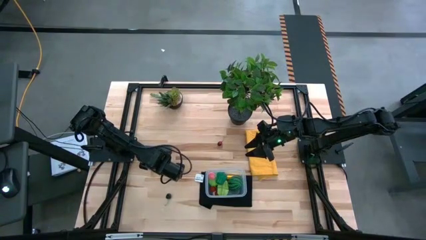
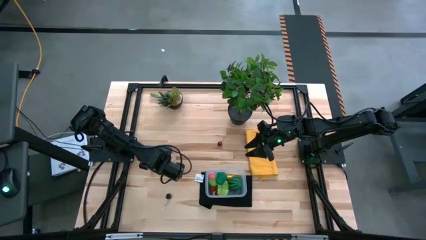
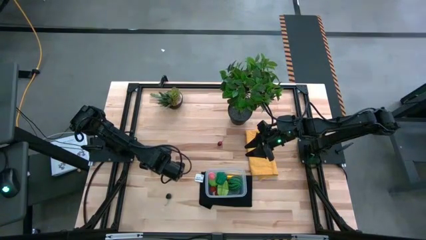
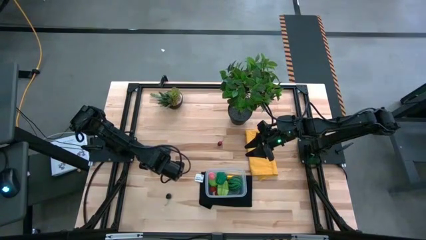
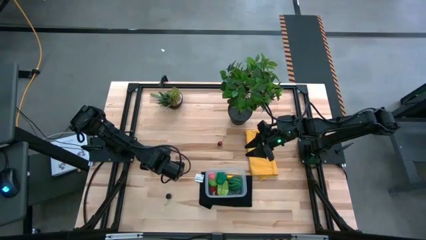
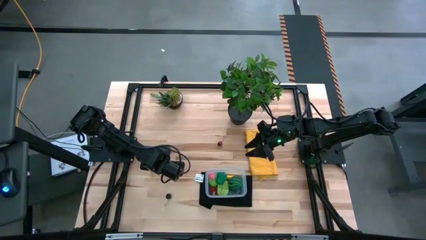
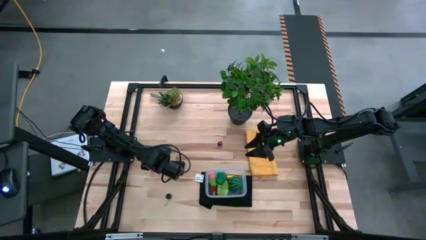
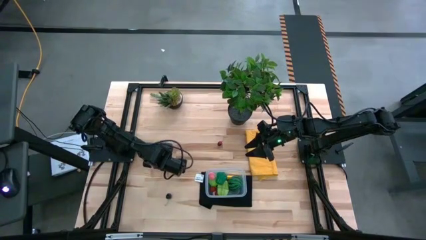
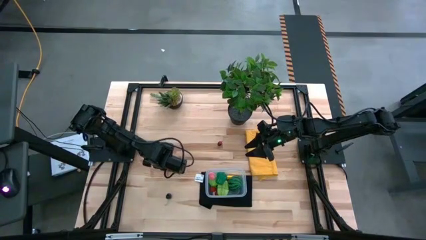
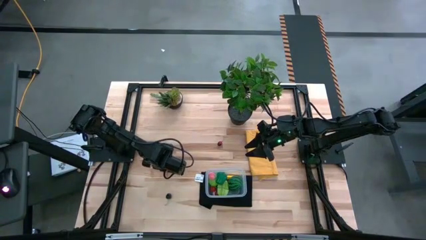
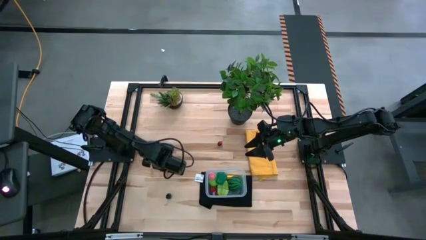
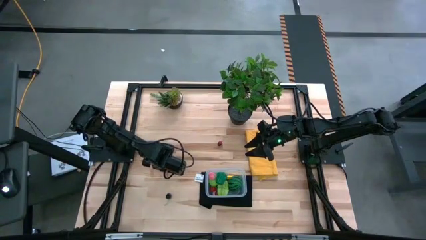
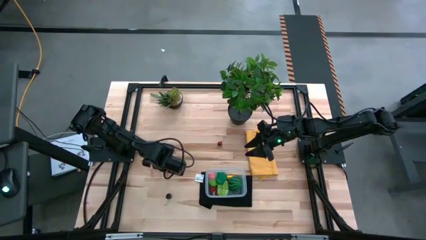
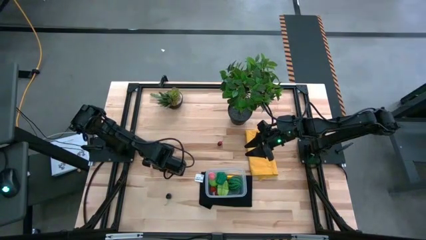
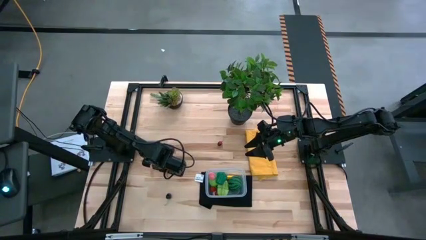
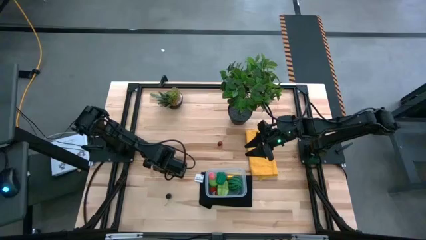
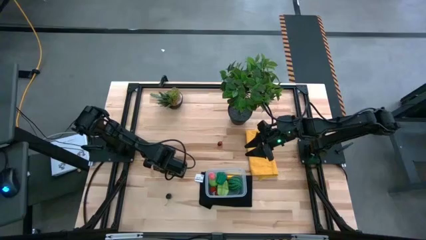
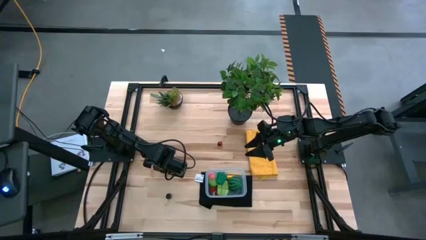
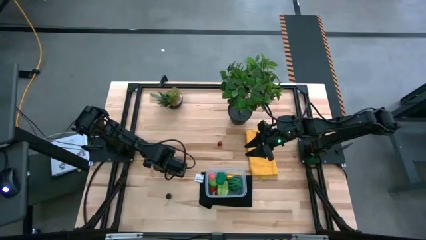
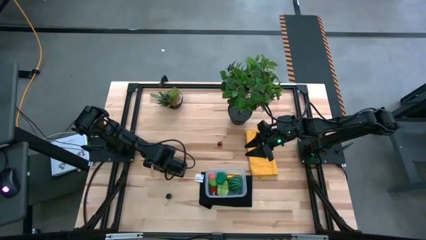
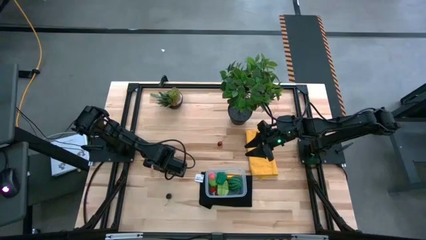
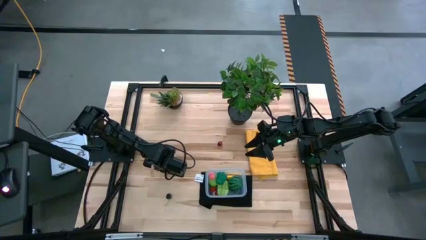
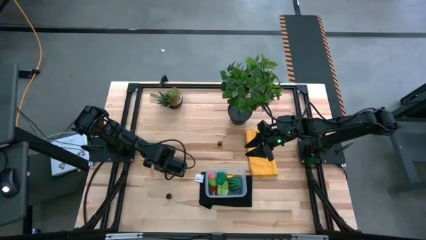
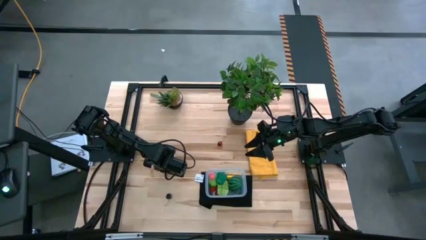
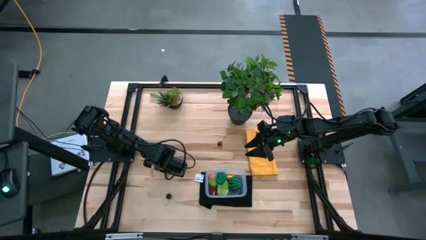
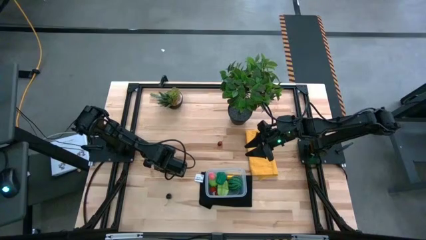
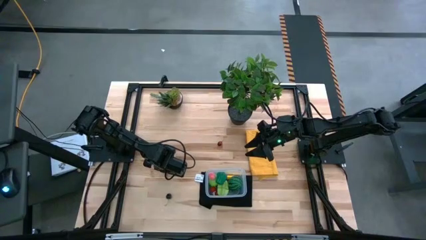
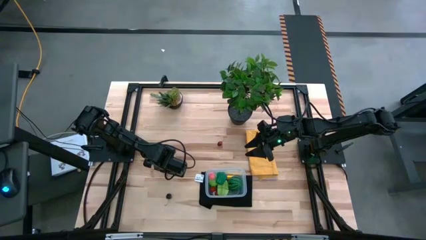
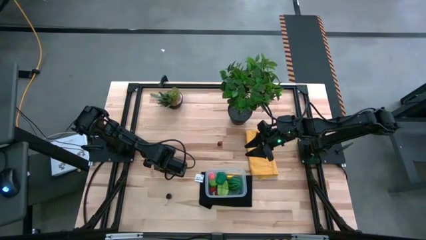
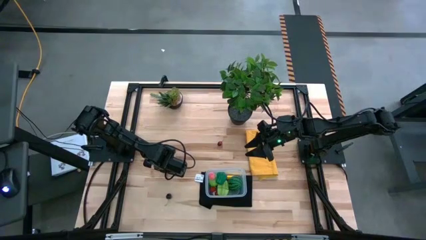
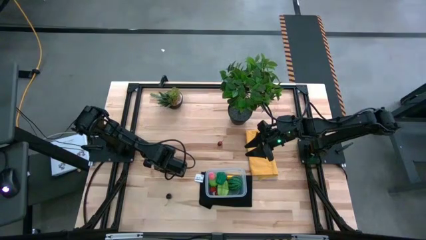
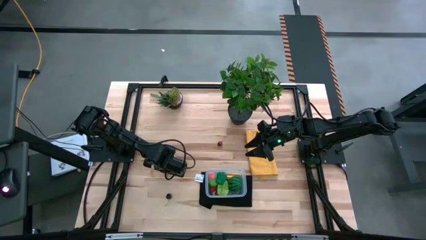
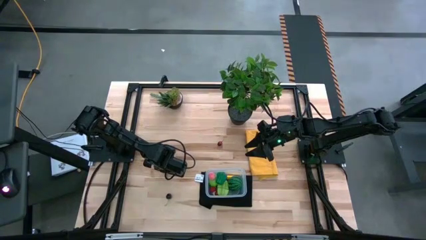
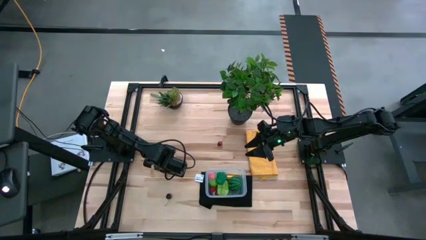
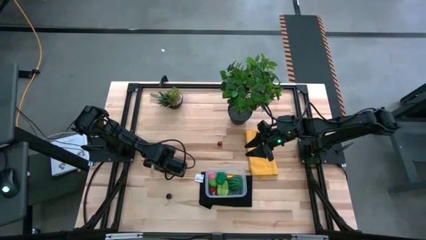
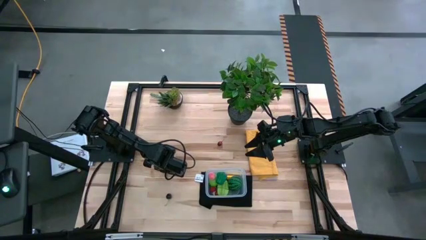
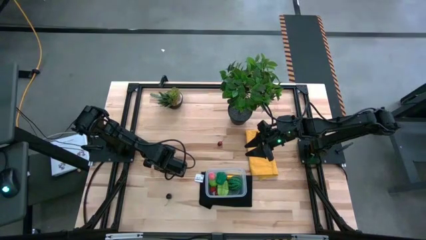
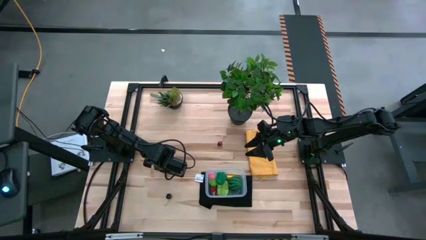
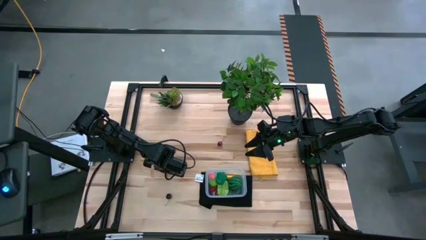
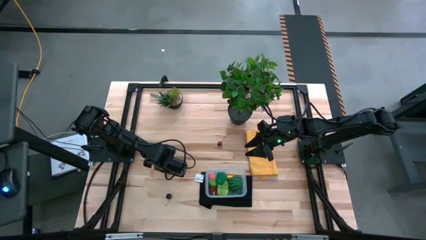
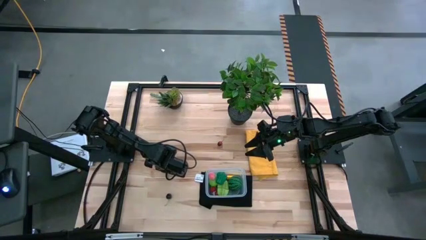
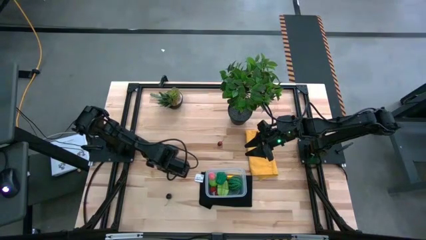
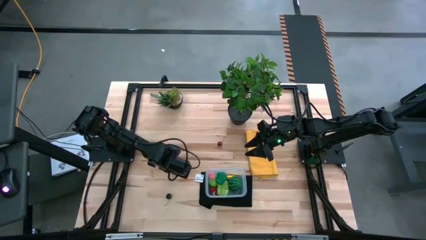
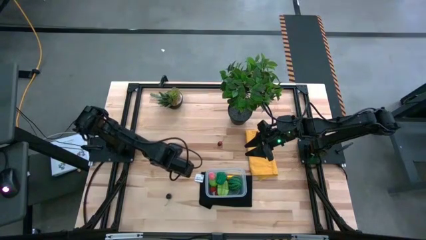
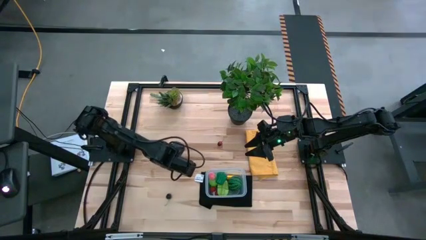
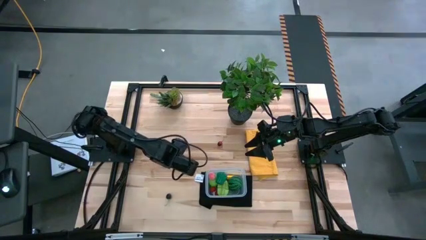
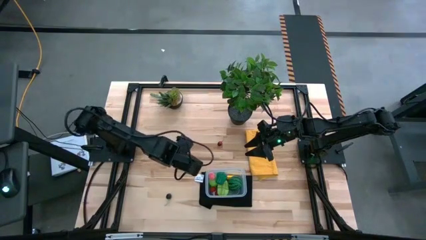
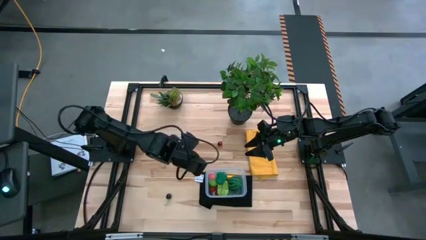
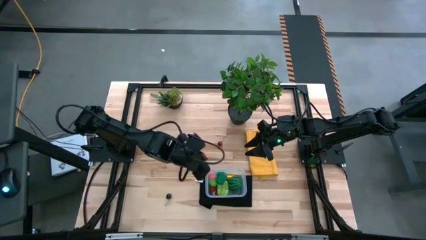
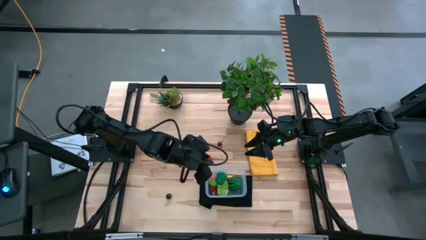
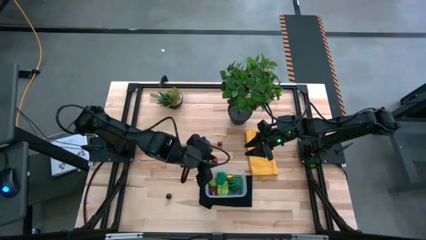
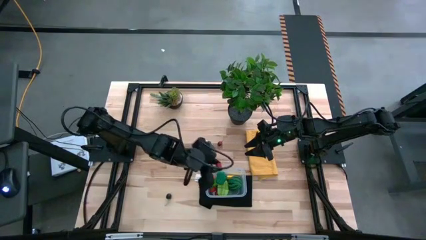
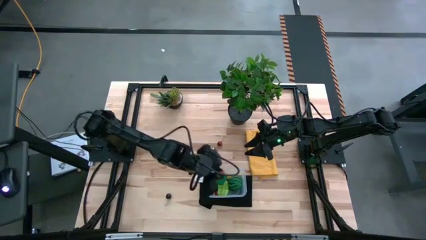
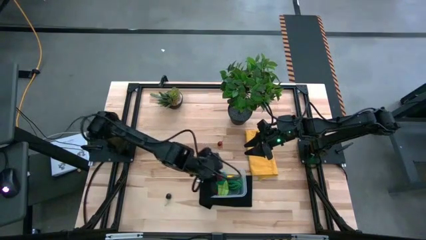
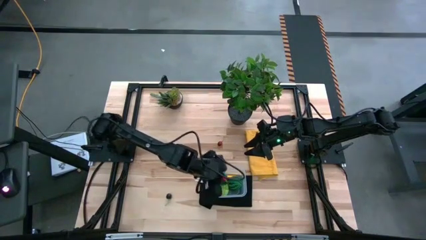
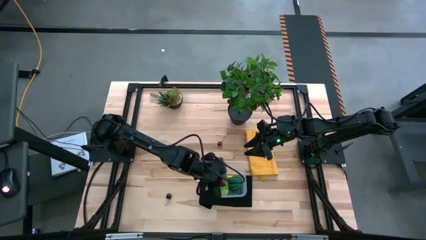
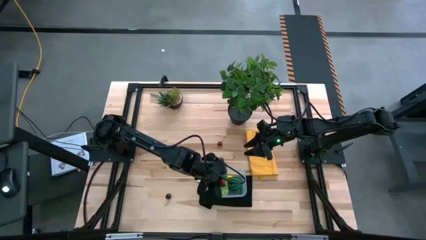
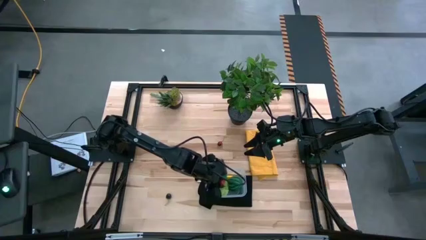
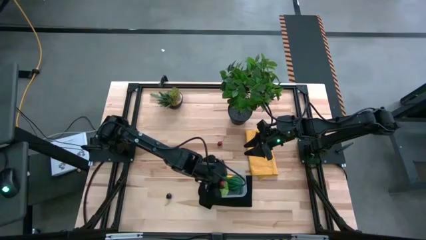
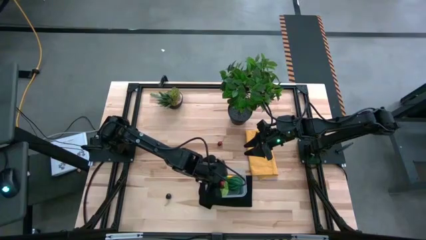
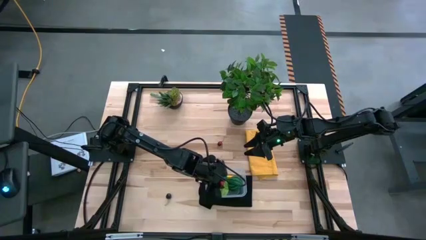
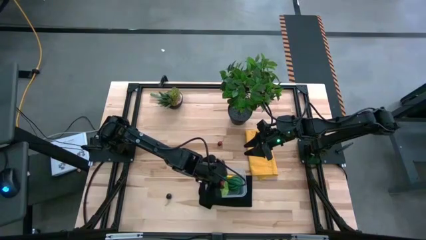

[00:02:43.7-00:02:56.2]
Task: Pick and placing Produce into tupperware
Put the left red cherry into the transparent bin

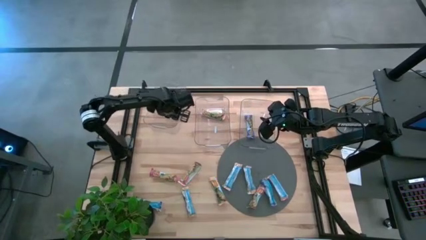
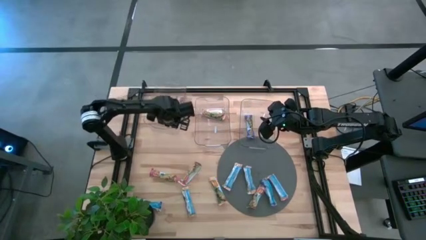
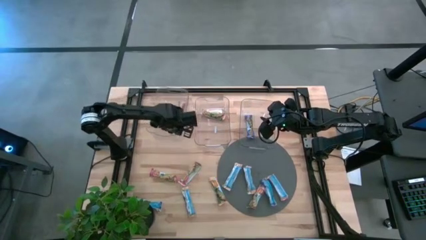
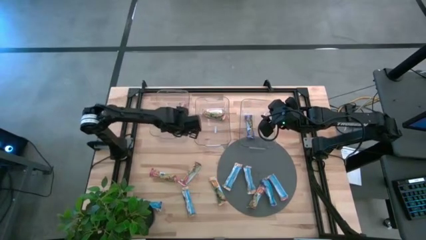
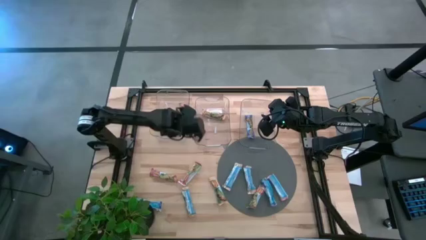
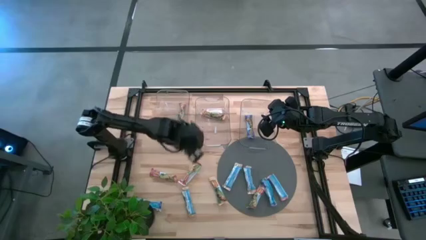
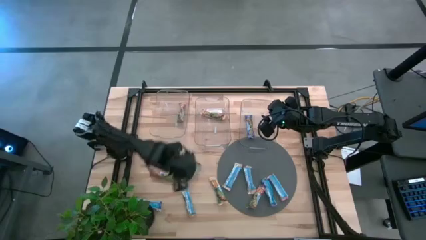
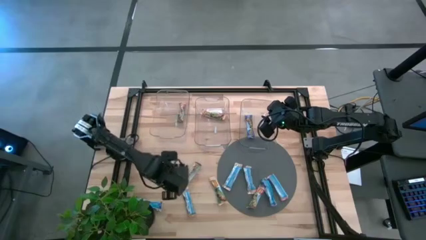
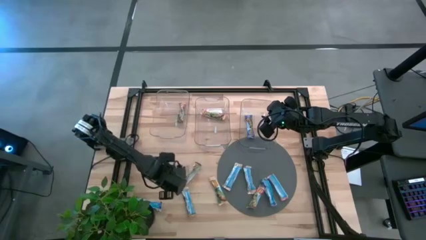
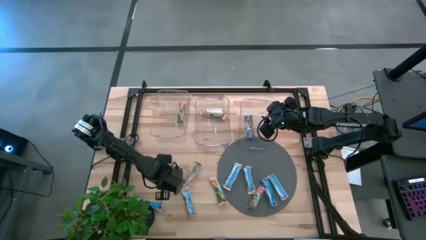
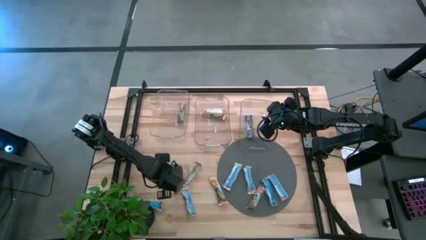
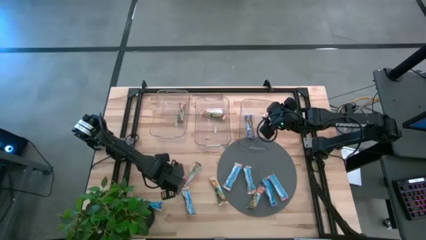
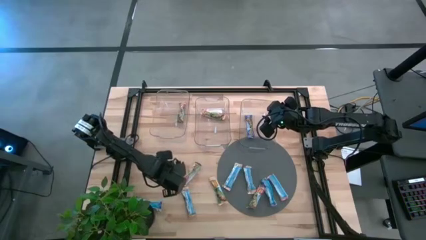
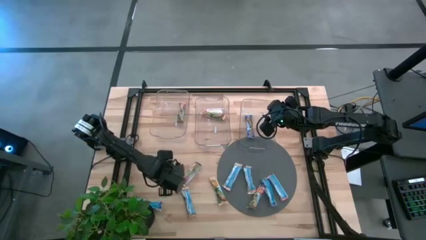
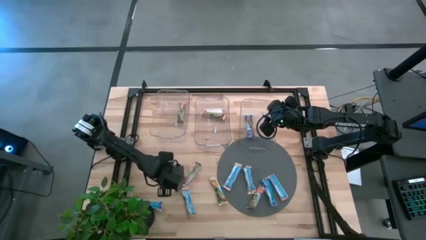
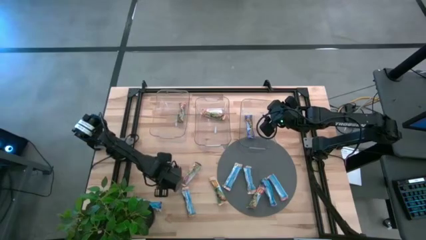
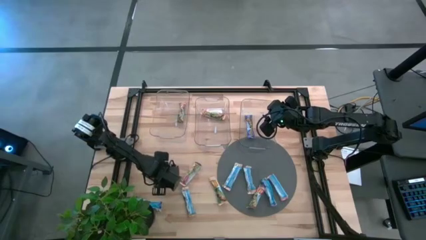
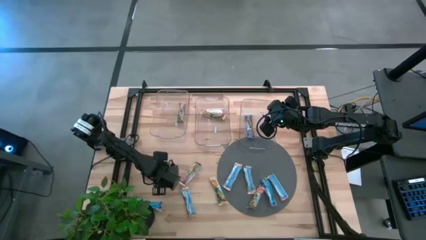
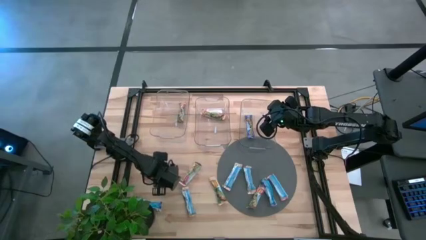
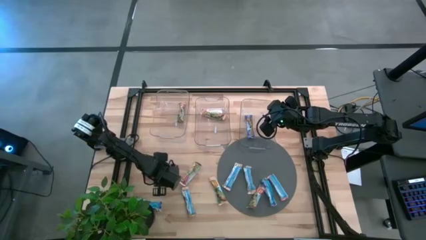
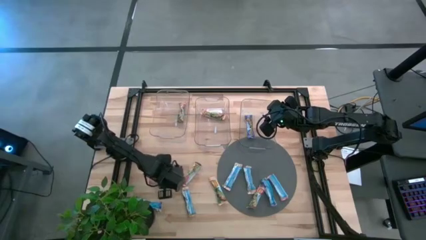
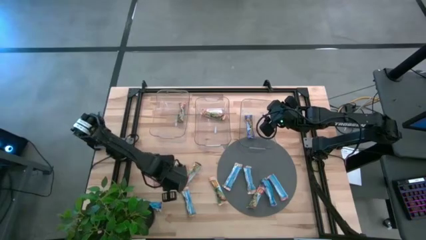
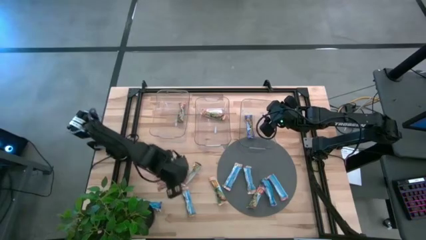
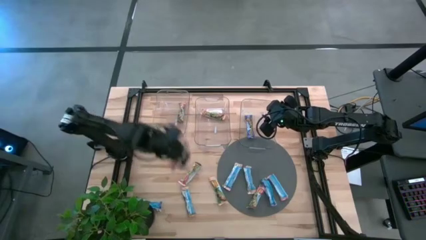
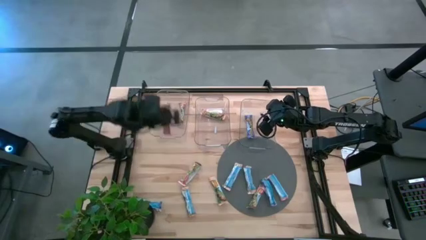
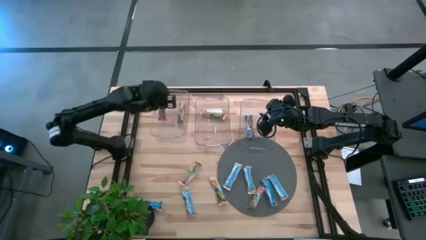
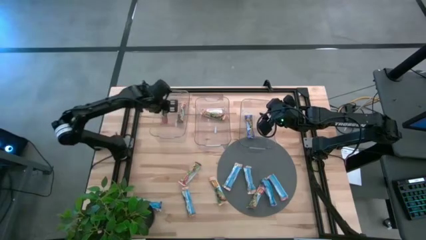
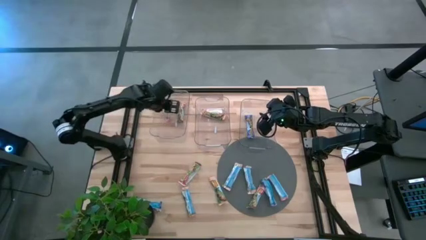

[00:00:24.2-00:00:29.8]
Task: Pick and place Granola Bars by type
Put the red snack bar into the left transparent bin
